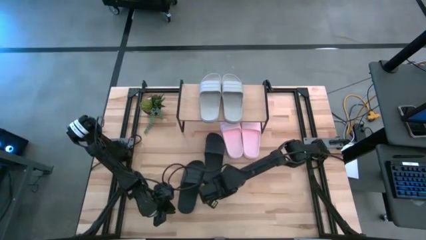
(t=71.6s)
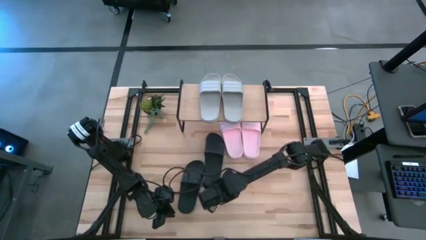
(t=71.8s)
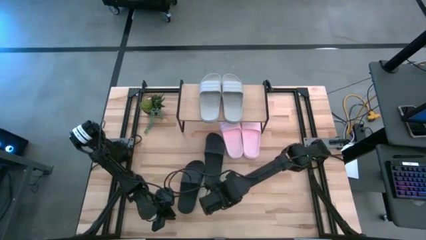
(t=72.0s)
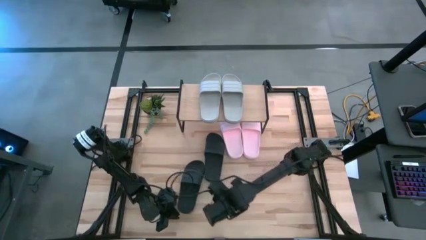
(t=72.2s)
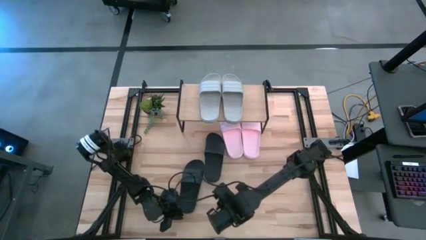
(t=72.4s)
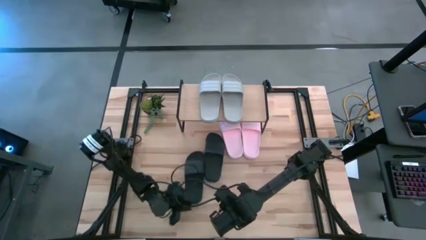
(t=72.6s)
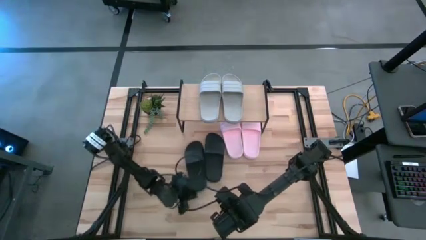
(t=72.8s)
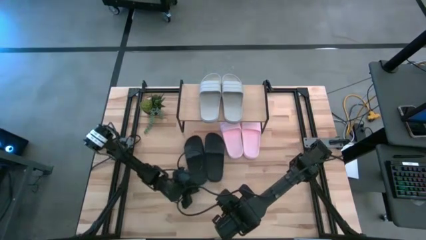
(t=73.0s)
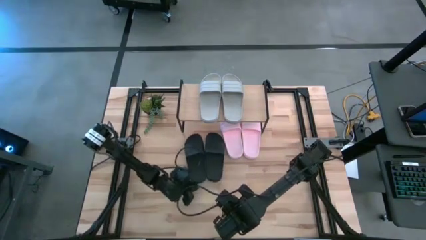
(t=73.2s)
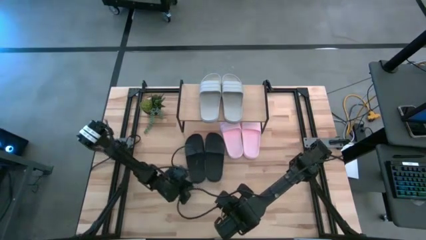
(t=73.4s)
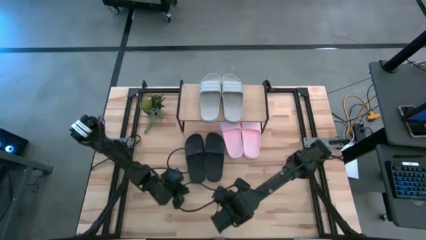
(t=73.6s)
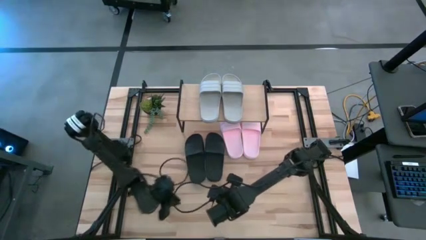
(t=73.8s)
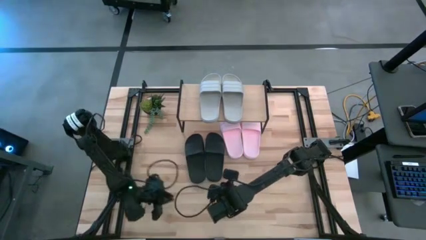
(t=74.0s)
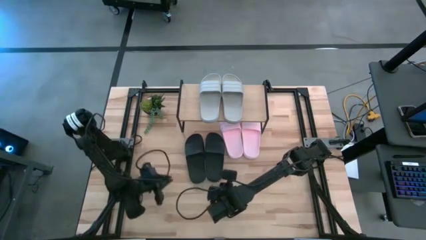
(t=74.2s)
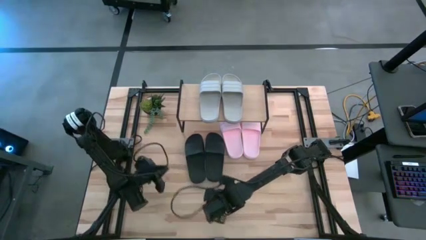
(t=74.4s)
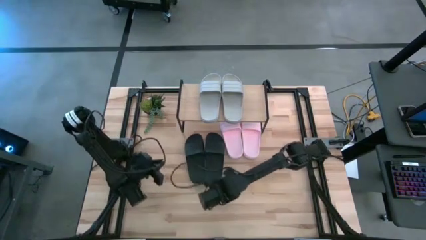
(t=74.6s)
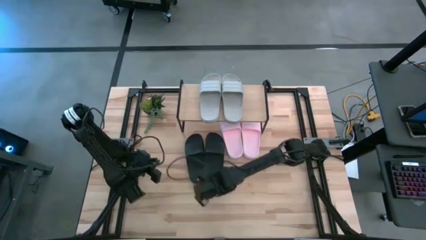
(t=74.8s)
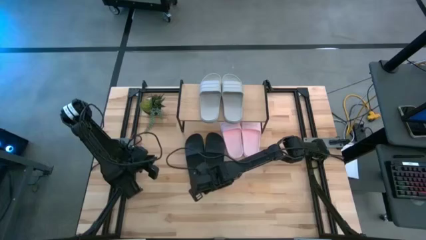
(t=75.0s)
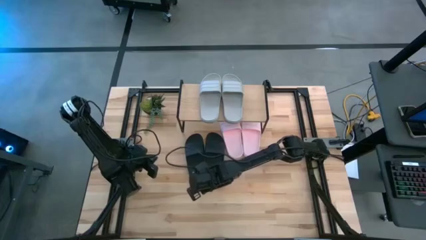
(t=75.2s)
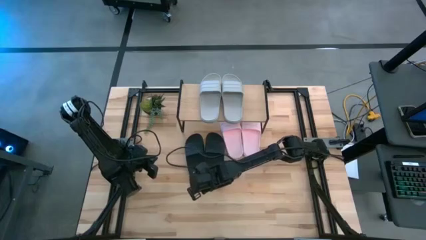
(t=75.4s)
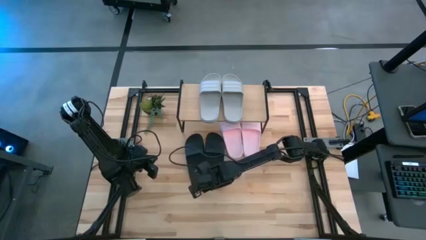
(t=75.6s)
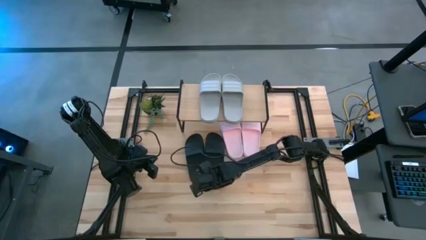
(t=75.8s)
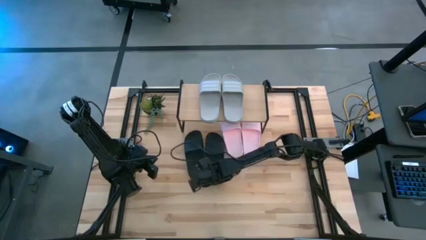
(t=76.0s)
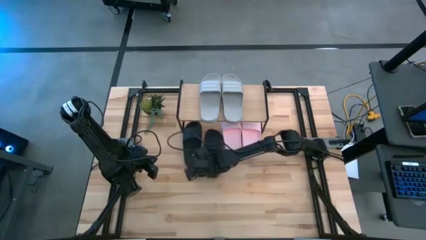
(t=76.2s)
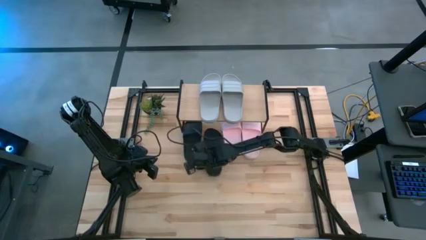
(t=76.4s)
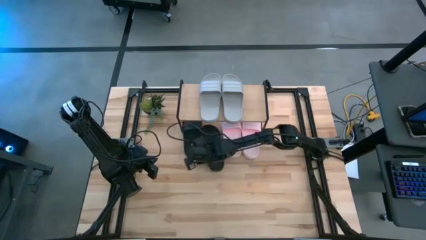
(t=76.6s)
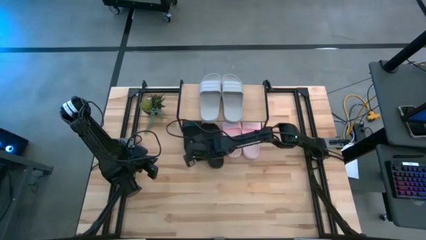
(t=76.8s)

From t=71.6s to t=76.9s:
Task: Pick and place slides into the shelf
Put the left black slide under the shelf

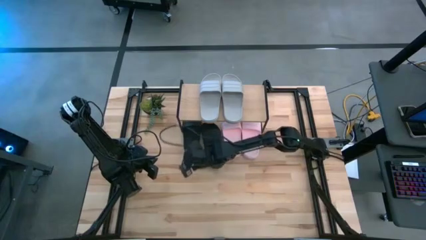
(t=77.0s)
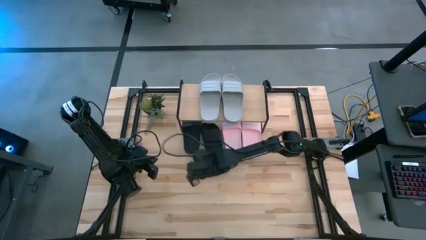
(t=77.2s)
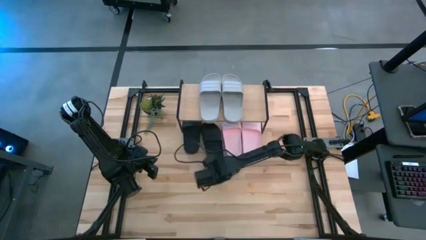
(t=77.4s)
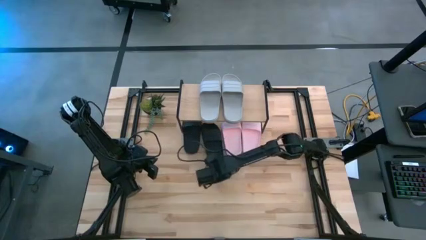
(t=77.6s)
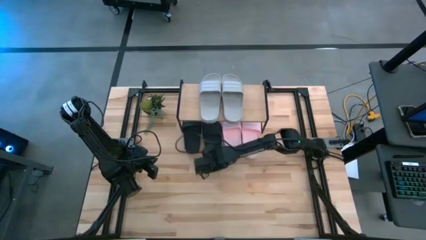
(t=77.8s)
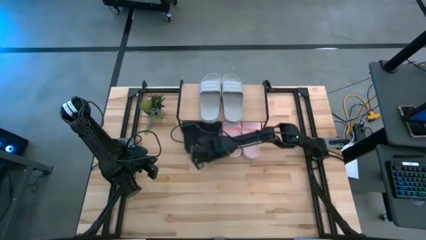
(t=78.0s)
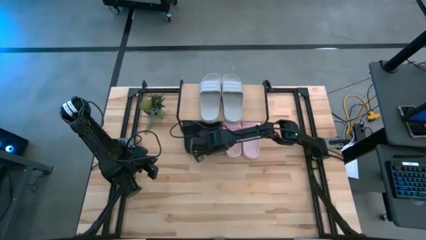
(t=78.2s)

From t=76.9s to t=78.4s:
Put the right black slides under the shelf

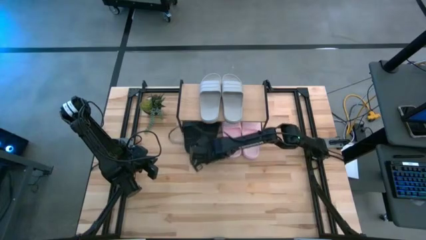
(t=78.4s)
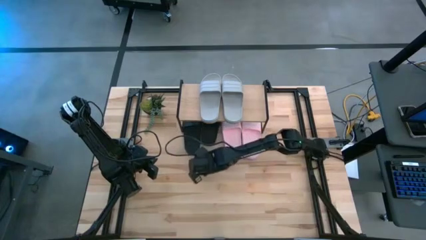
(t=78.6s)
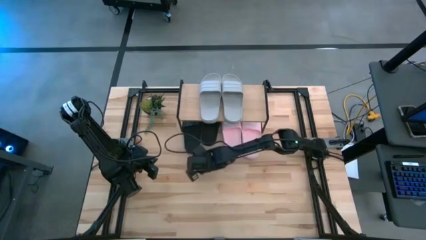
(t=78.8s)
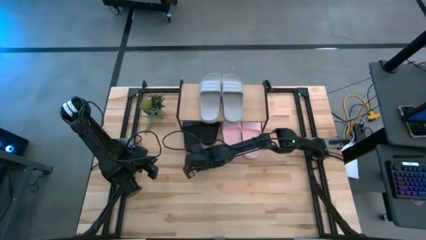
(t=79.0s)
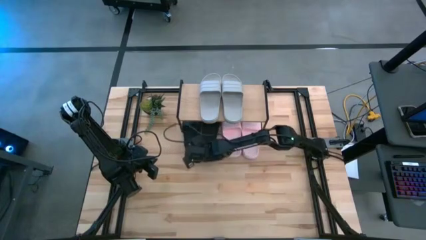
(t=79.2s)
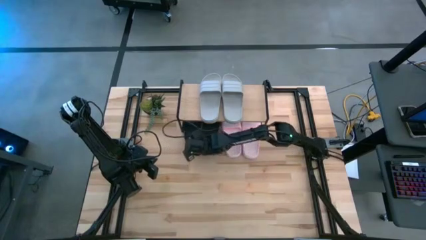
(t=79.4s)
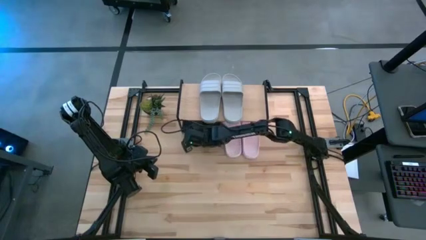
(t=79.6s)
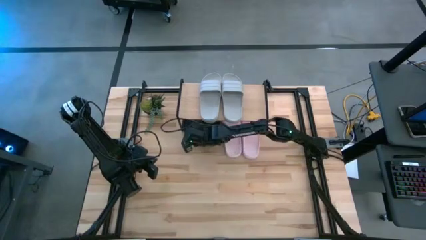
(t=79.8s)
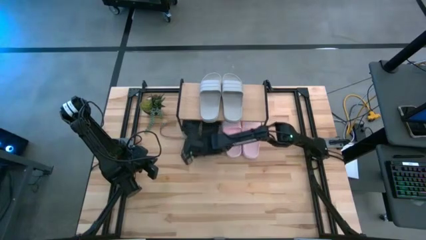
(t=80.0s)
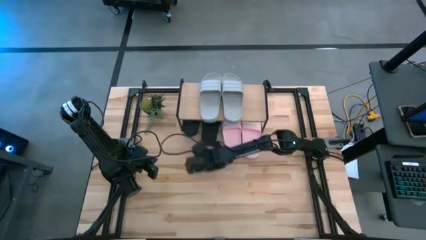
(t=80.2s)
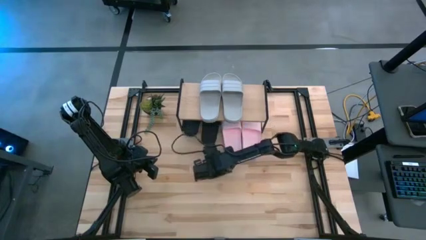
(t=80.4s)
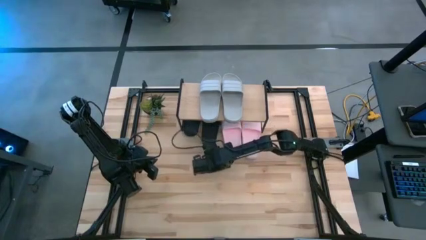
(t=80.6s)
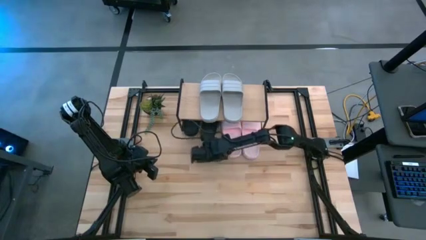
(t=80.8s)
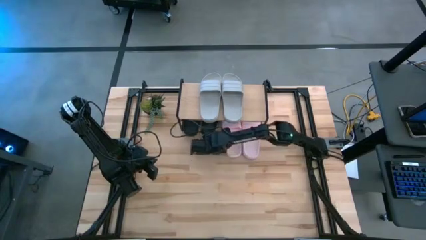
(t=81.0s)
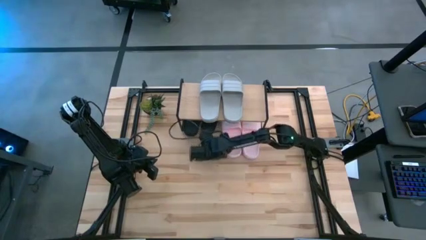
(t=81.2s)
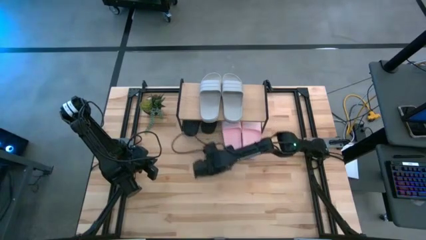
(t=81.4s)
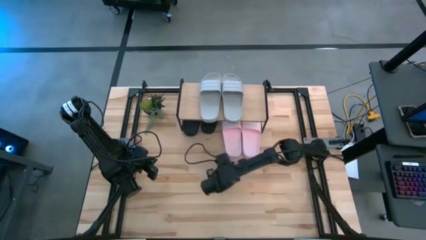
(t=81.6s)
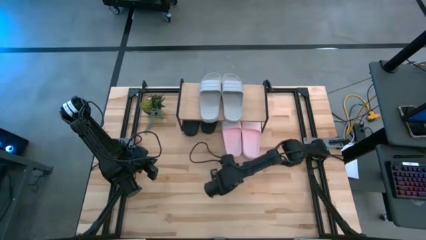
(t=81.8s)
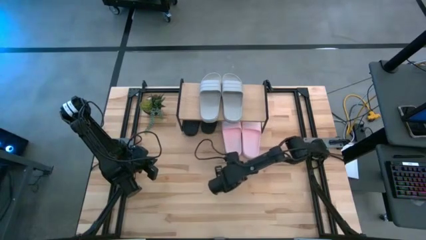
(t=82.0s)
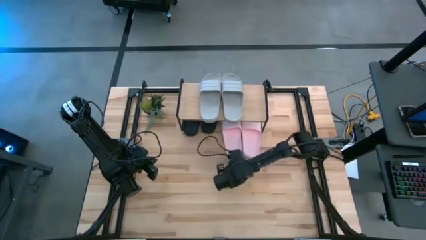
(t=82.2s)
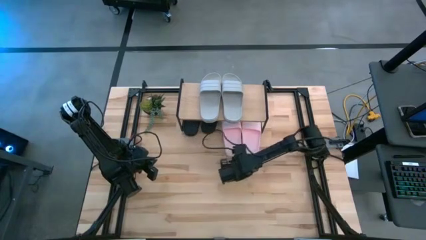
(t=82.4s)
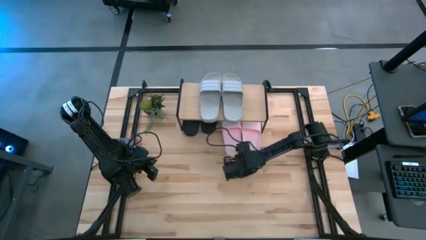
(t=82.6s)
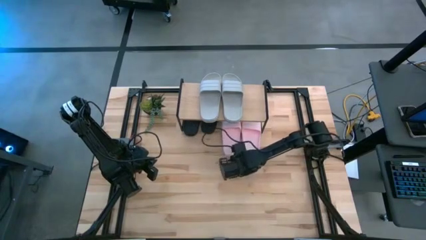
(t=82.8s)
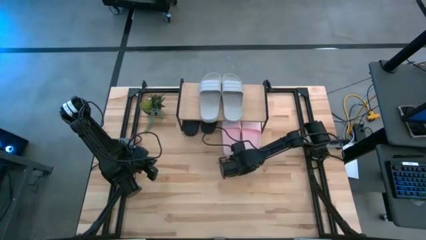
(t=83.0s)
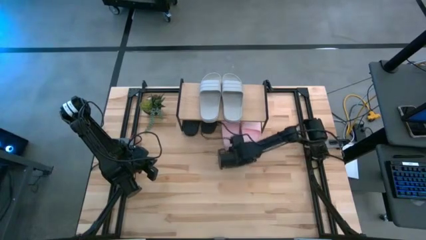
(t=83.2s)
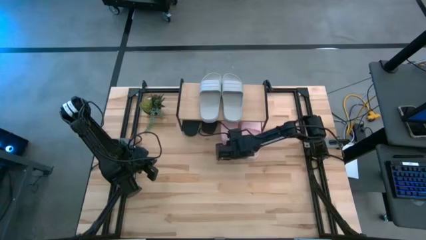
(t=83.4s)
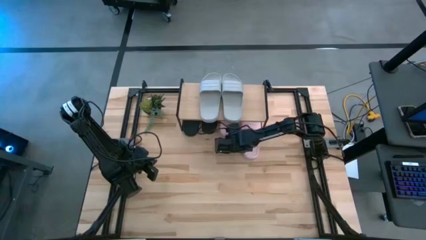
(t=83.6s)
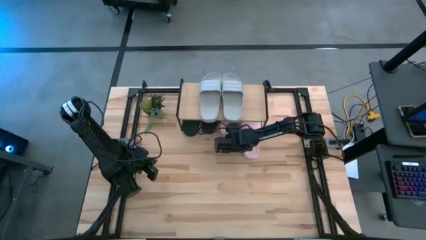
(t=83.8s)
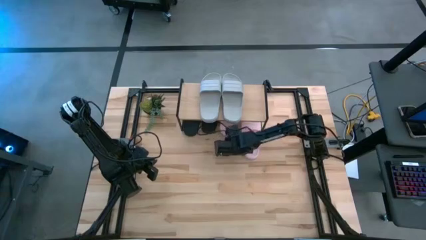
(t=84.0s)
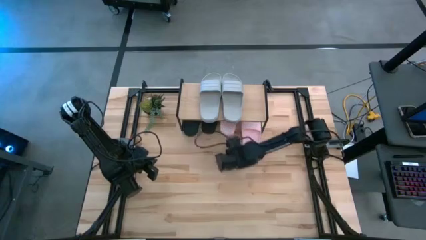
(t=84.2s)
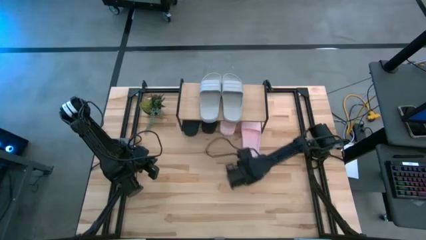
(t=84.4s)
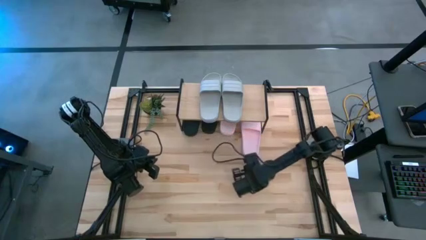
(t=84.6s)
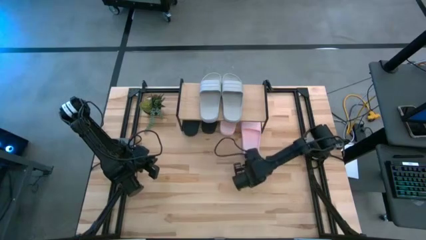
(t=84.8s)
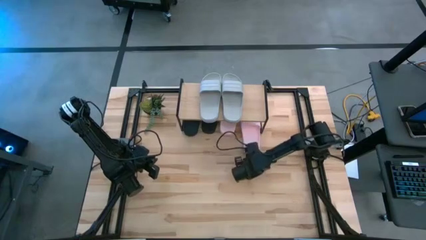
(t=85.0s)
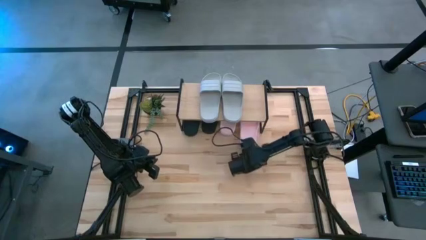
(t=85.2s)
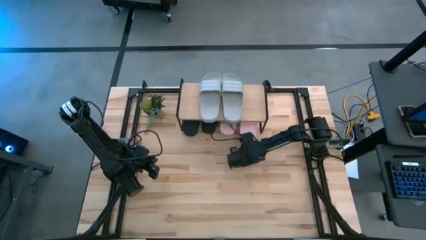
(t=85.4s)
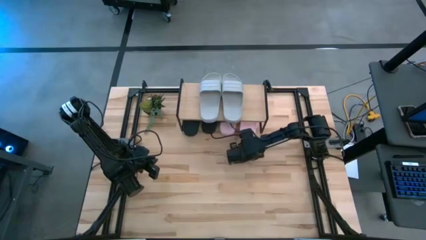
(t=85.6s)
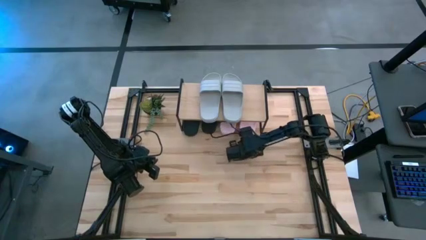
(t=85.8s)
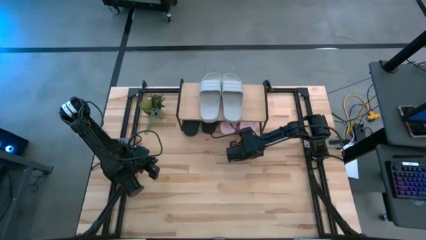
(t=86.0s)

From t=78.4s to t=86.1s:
Adjust the slides under the shelf

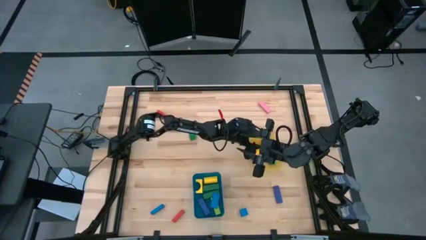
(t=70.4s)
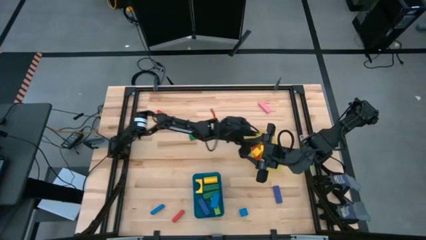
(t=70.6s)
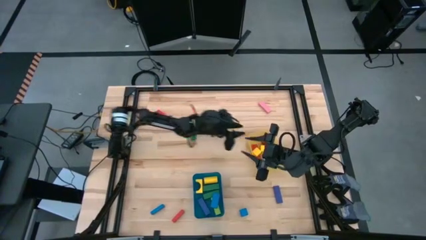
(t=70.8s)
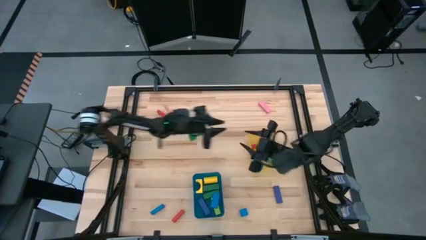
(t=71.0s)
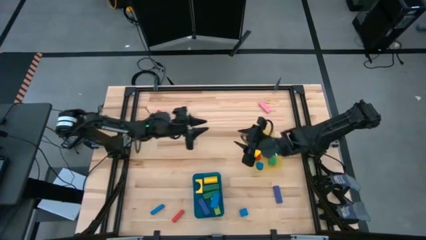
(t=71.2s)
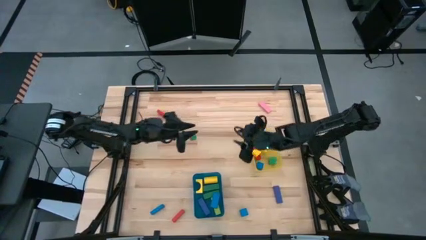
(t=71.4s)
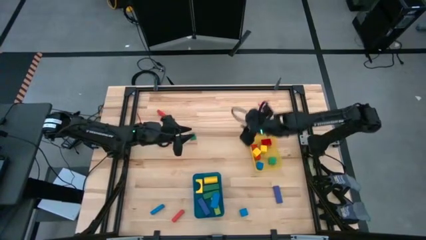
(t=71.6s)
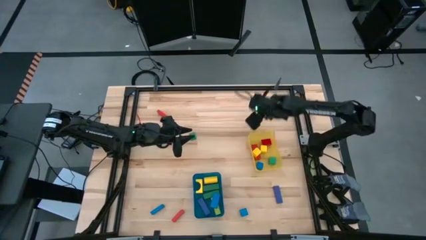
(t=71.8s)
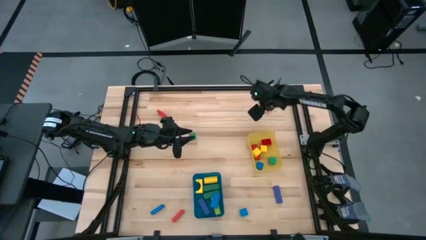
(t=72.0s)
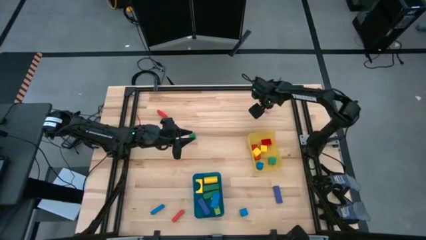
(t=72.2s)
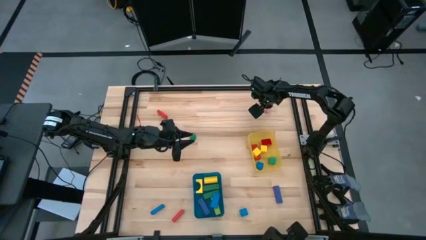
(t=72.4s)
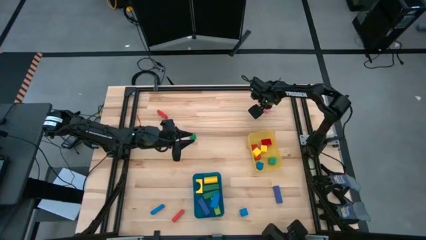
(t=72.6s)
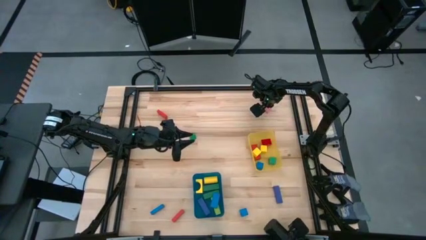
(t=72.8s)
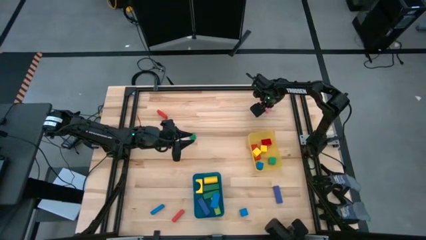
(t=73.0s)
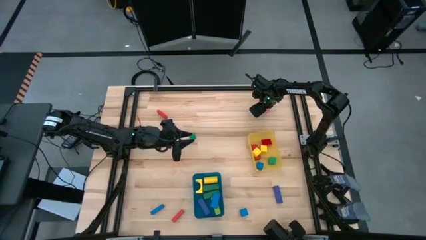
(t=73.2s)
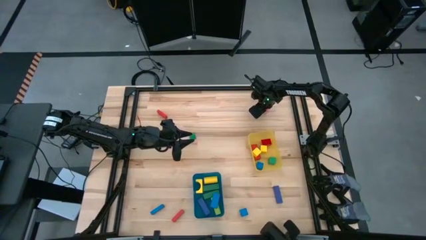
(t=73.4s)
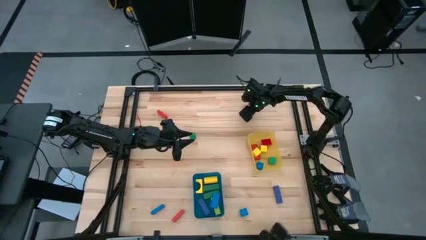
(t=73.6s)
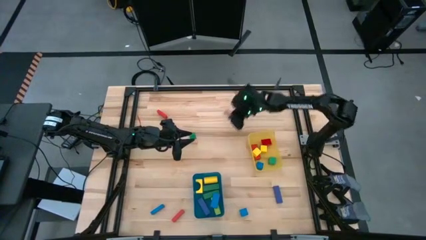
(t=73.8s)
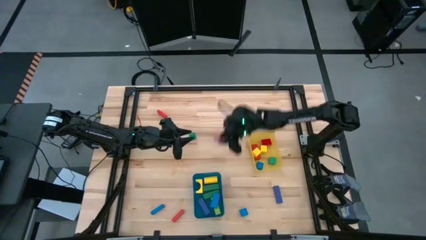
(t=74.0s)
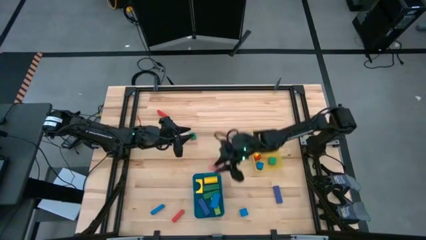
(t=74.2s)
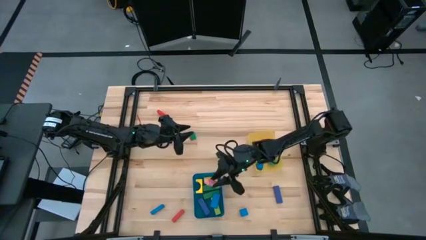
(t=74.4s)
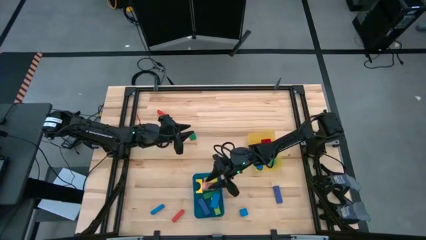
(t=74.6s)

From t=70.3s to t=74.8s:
Task: Sort blocks by size
Put the large pink block into the blue bin
